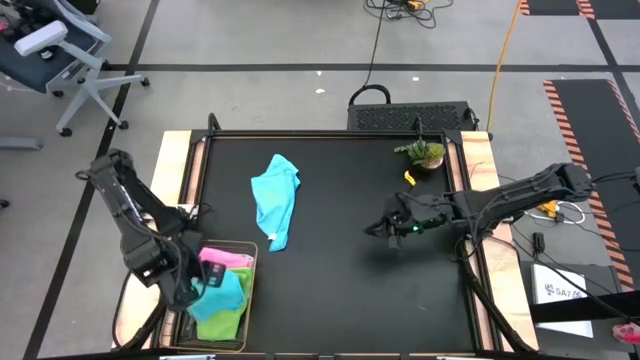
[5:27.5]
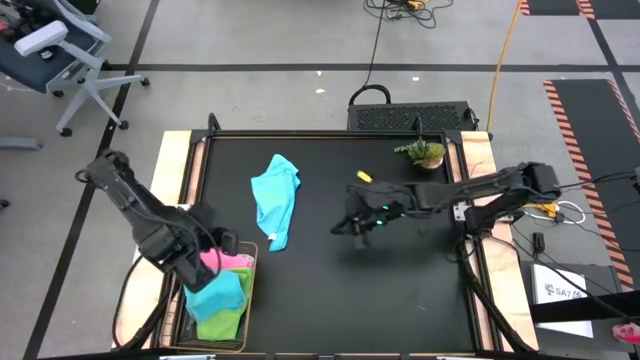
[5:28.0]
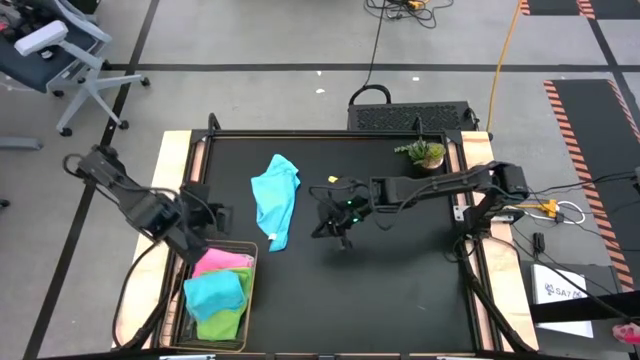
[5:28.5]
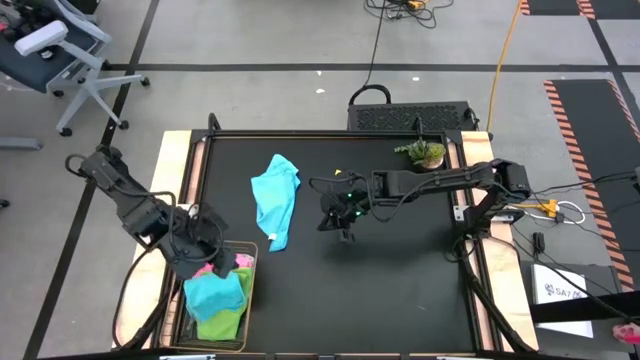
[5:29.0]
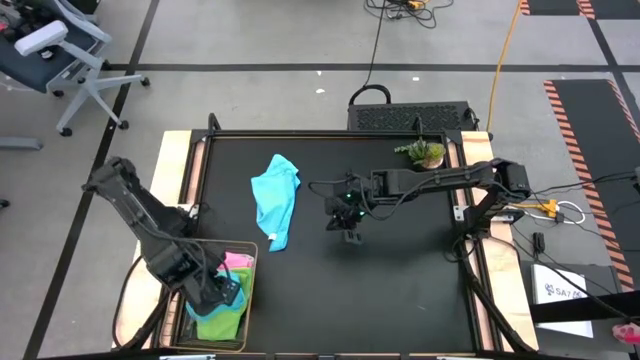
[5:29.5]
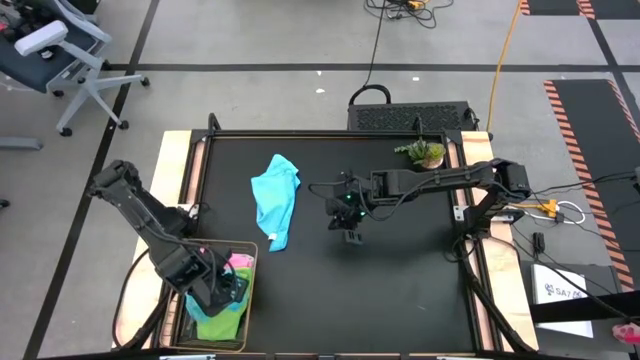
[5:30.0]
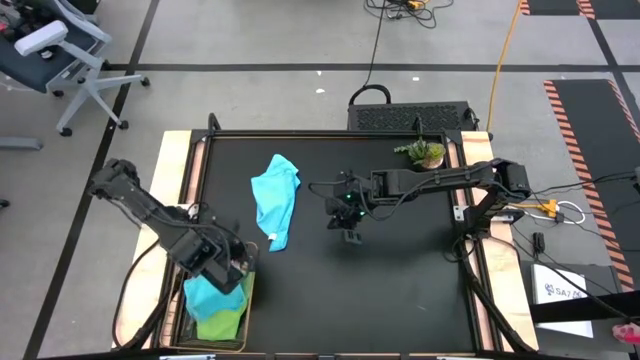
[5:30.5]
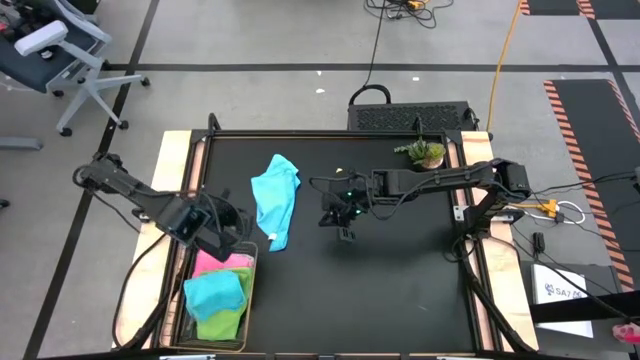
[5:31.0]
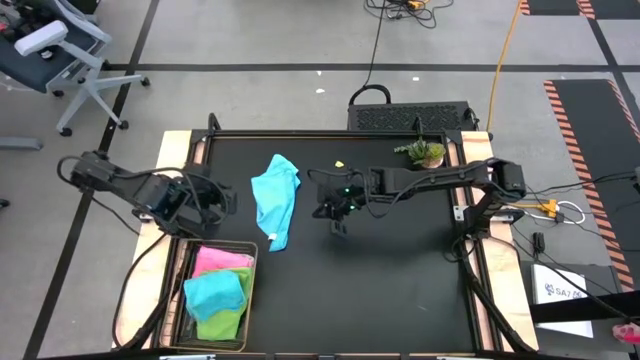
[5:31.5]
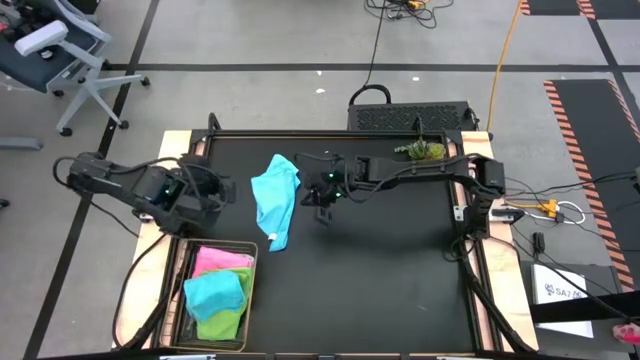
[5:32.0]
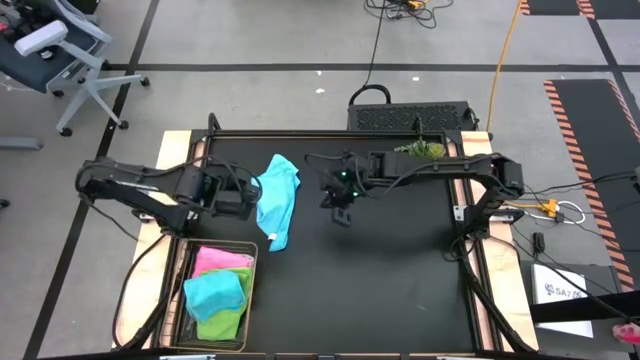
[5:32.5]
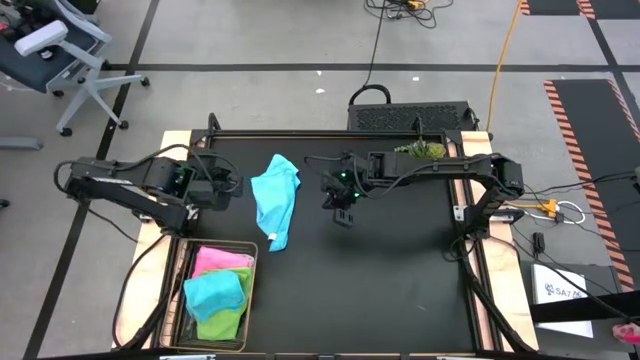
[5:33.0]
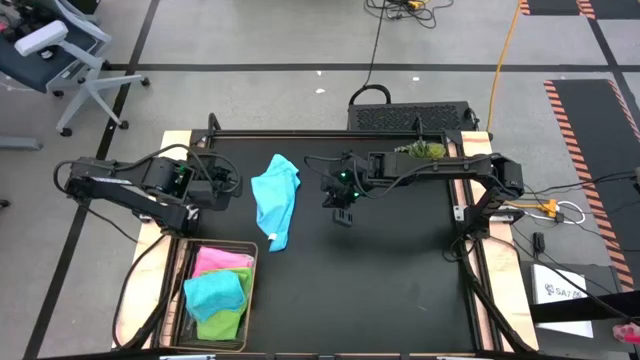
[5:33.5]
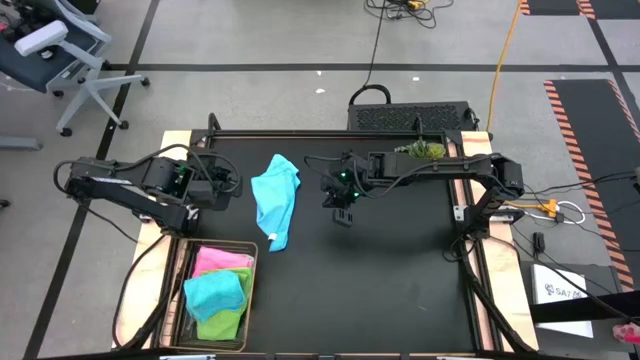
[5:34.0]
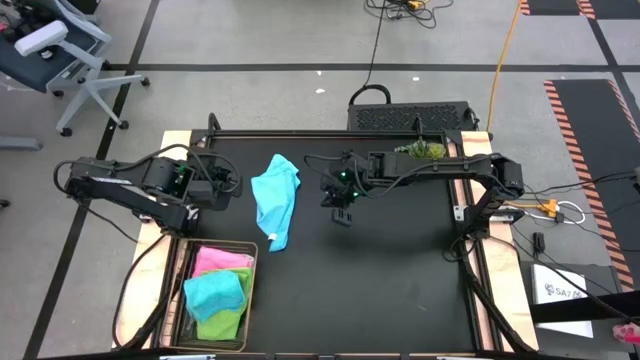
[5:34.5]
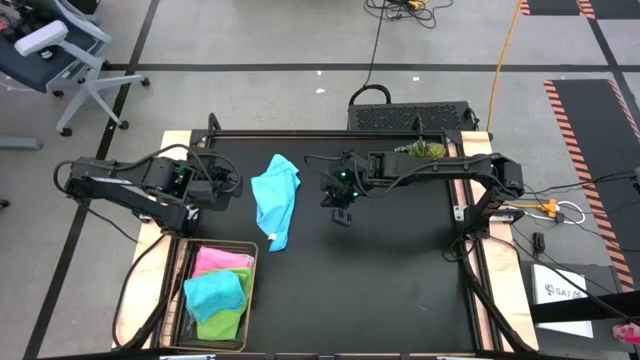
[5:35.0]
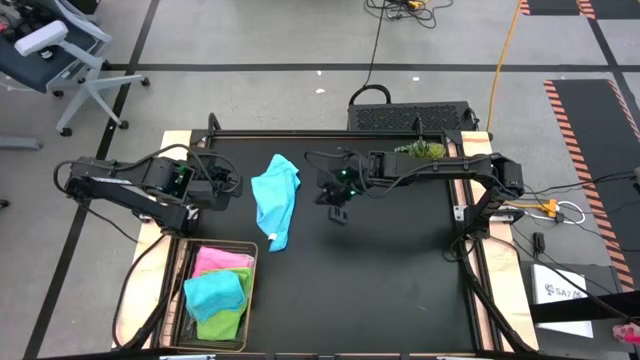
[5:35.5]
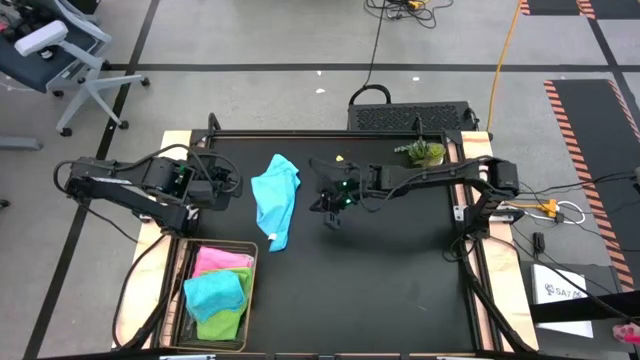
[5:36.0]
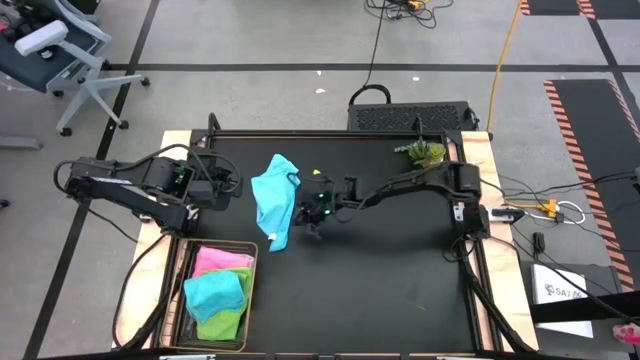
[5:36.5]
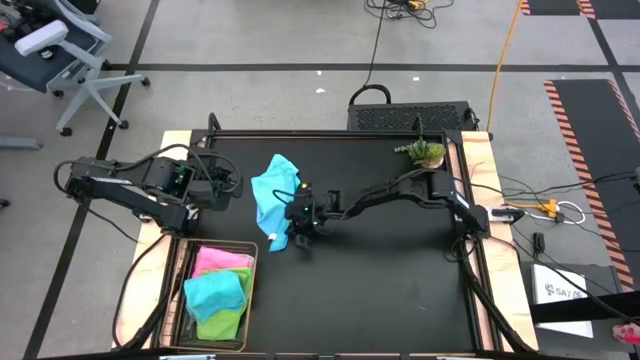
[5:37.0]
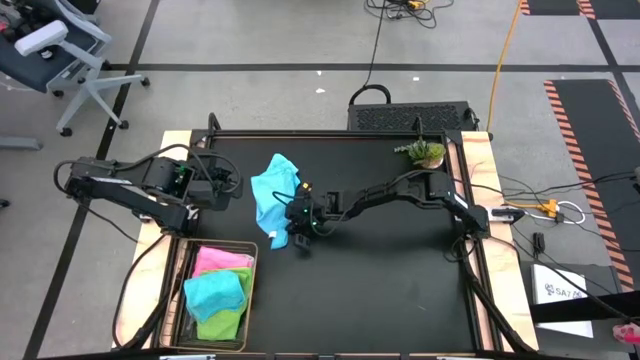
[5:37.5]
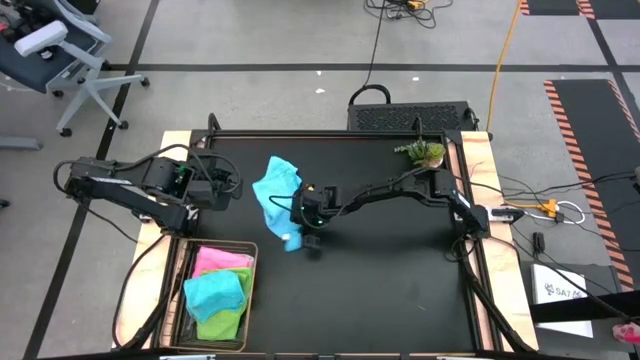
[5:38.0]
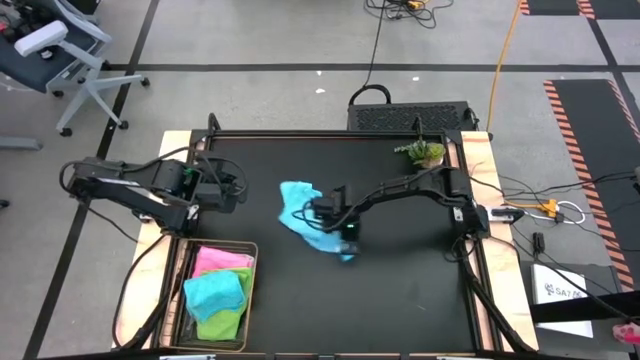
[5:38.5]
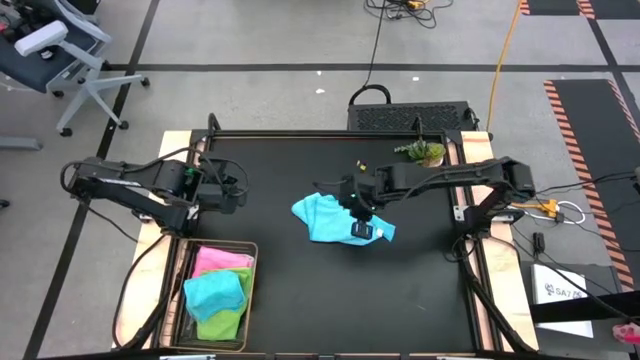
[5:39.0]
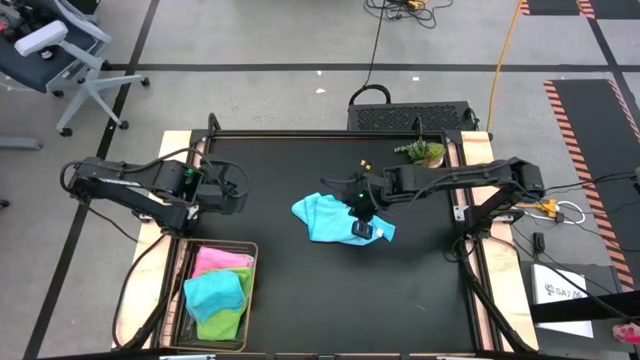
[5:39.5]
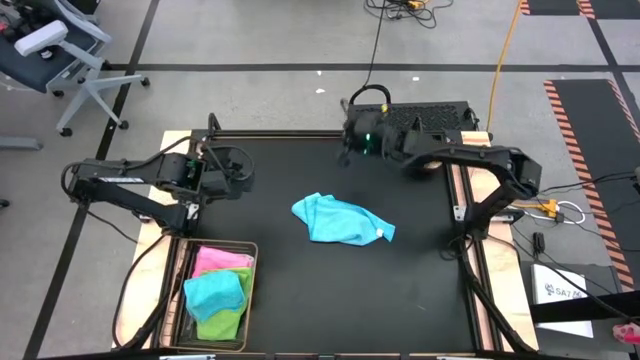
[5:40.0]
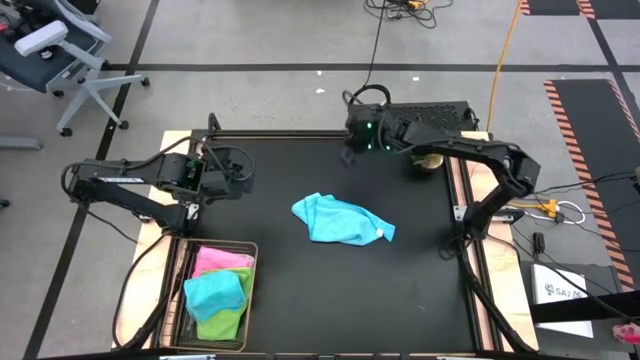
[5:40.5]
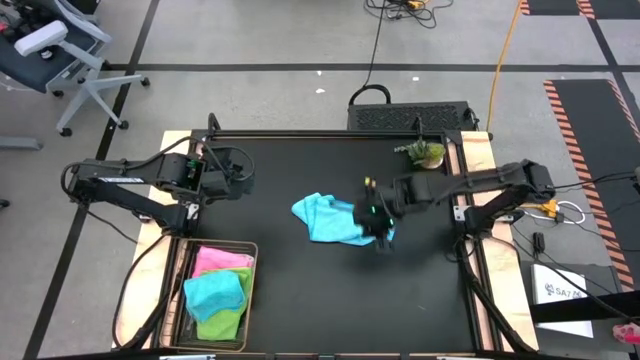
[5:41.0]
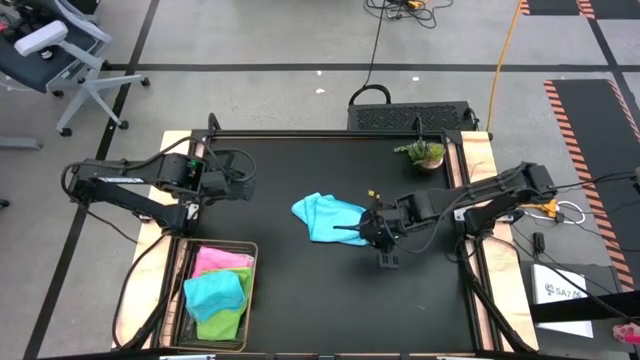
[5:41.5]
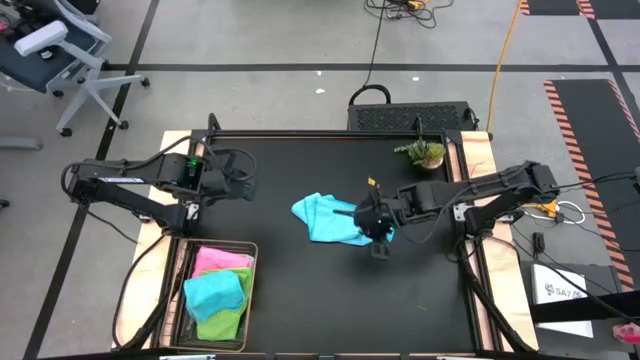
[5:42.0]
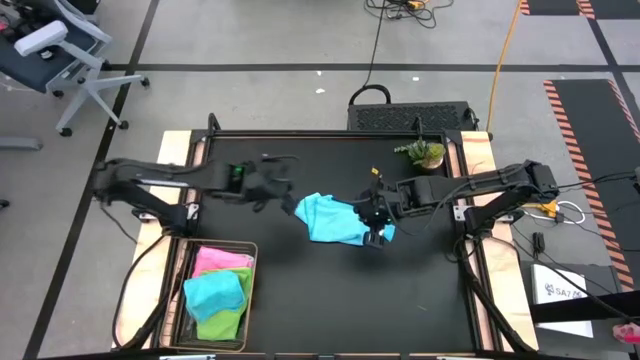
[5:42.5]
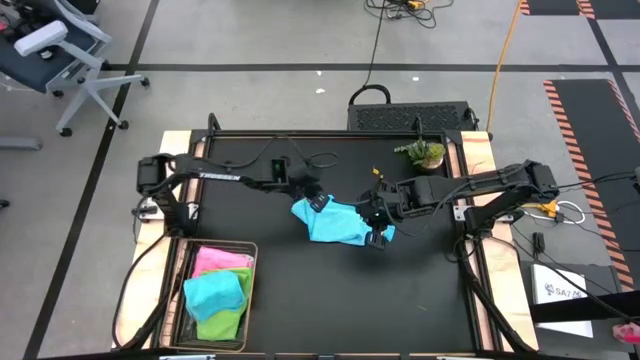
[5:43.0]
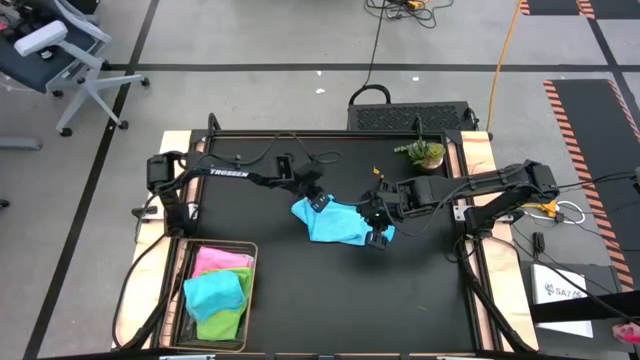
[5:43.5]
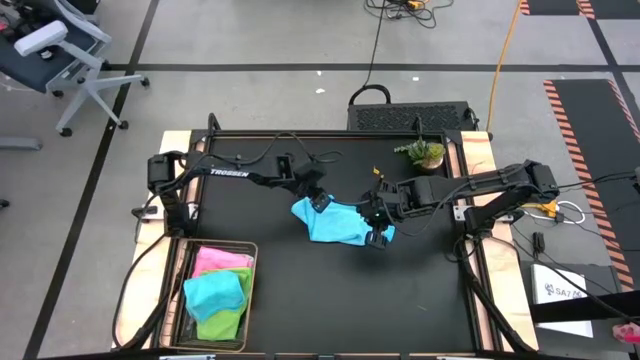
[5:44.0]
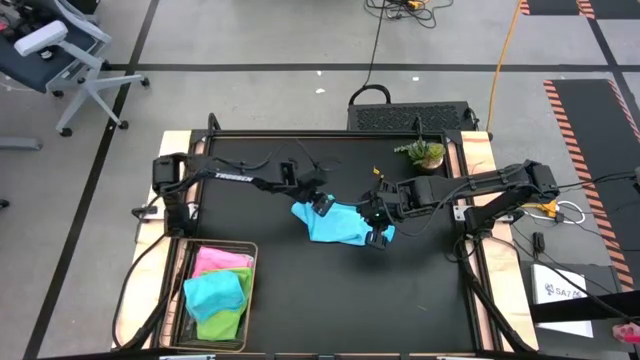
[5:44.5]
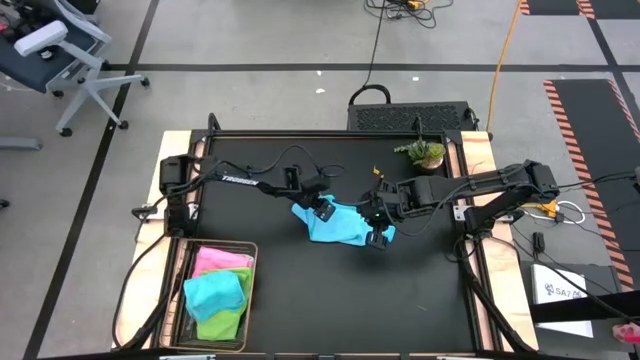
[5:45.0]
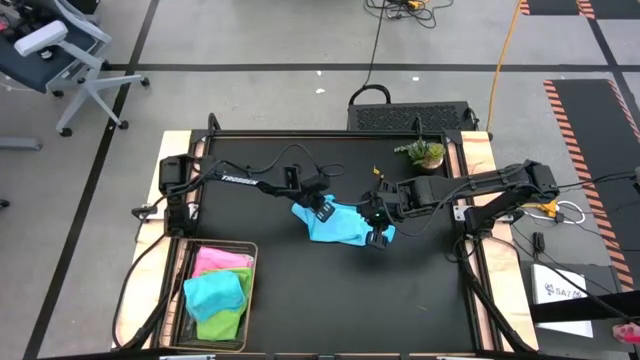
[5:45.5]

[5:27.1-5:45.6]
Task: Fold microfiber towels
Fold the blue microfiber cloth

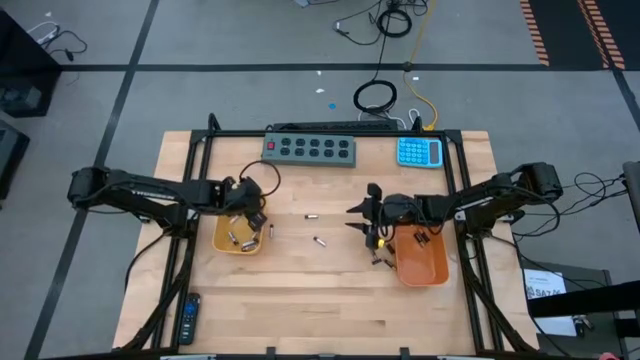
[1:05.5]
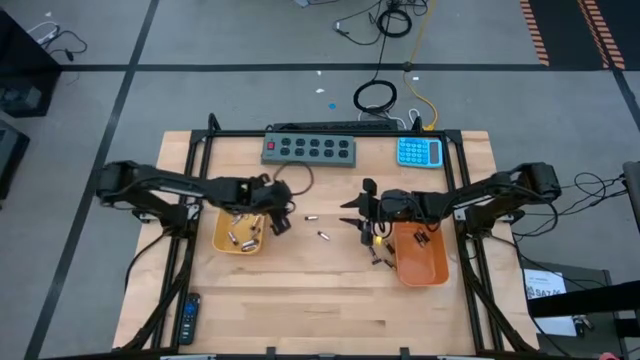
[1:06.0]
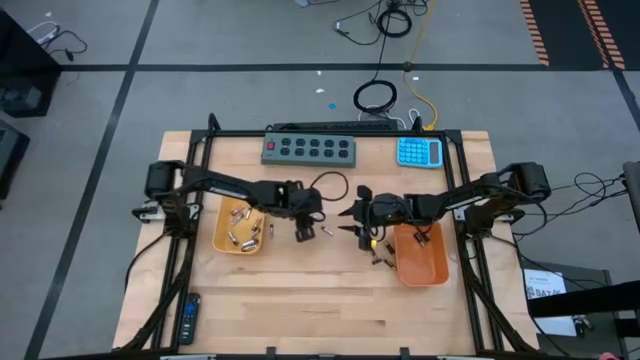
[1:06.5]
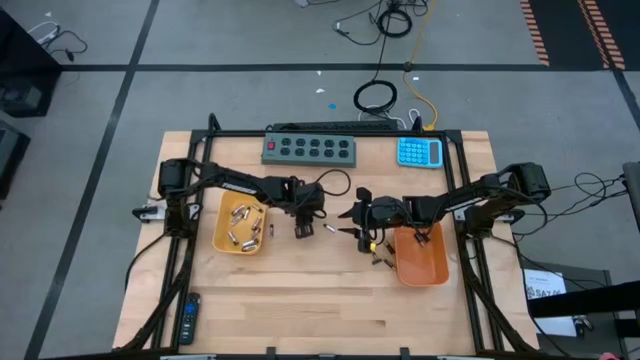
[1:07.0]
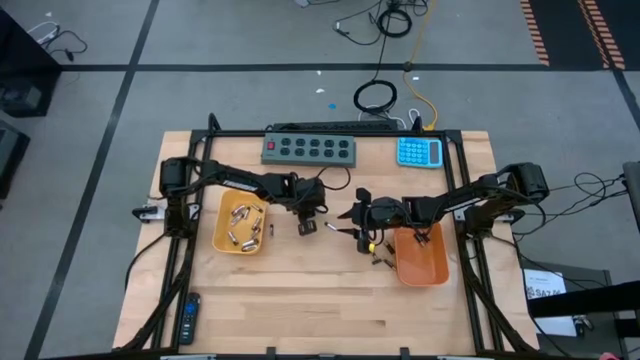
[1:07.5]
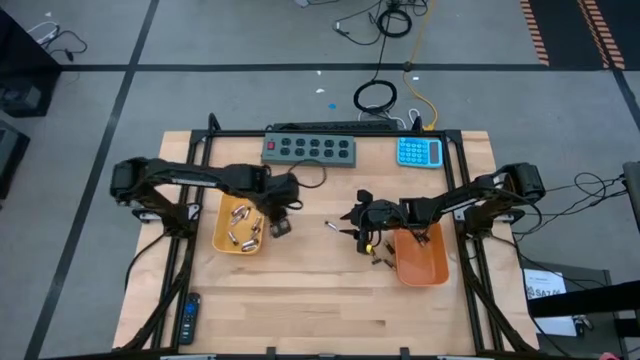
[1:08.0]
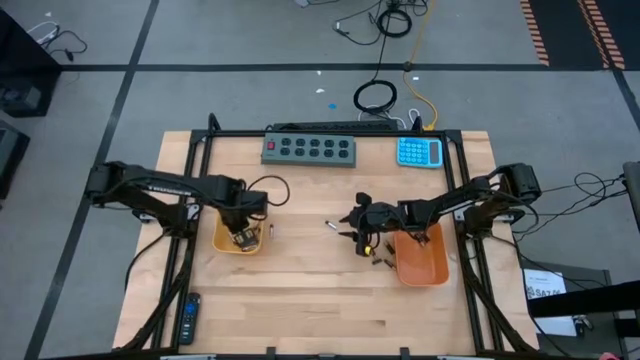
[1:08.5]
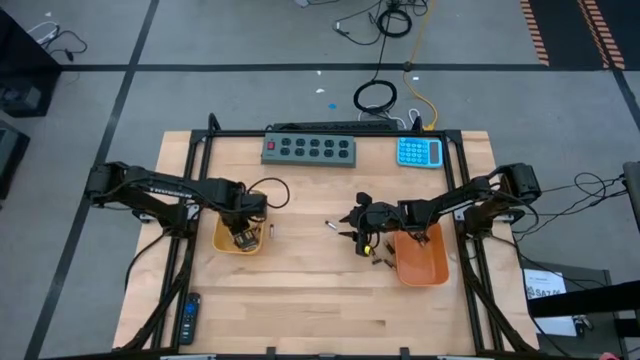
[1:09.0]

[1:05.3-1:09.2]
Task: Sort batteries
Put the silver battery into the yellow bin
